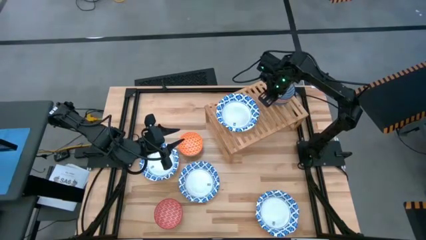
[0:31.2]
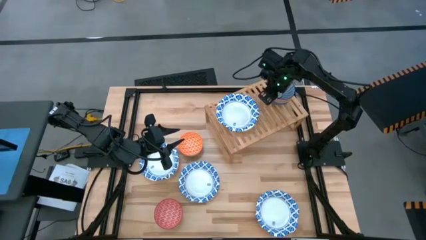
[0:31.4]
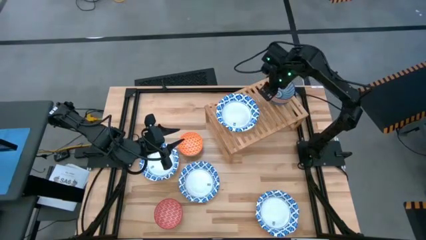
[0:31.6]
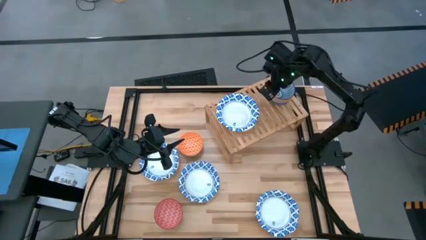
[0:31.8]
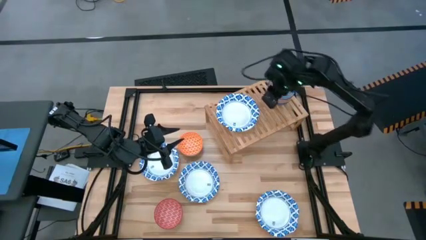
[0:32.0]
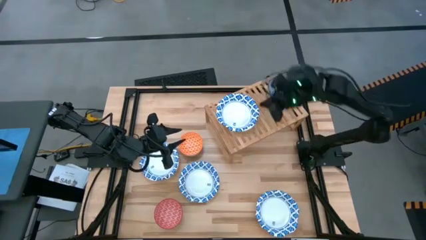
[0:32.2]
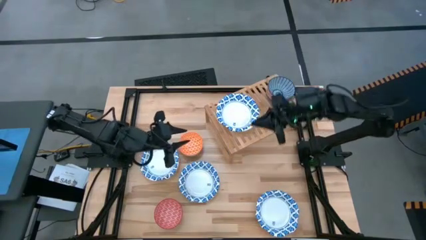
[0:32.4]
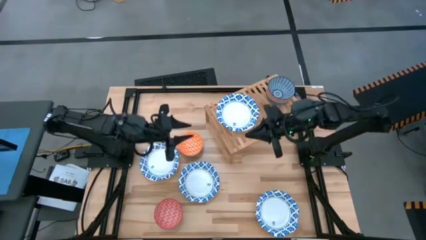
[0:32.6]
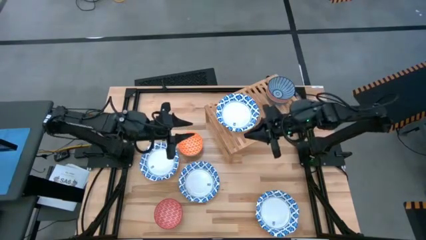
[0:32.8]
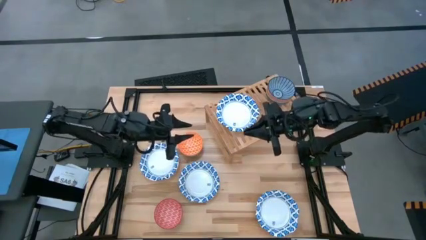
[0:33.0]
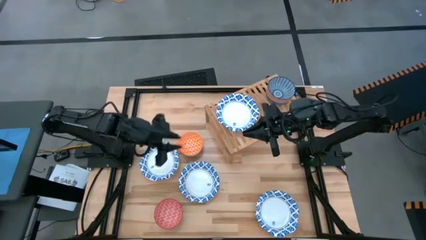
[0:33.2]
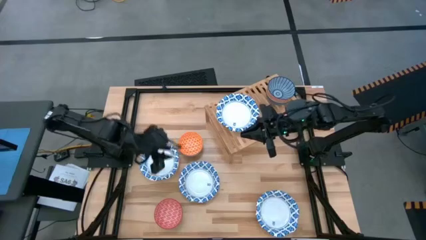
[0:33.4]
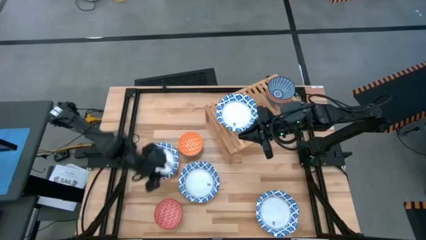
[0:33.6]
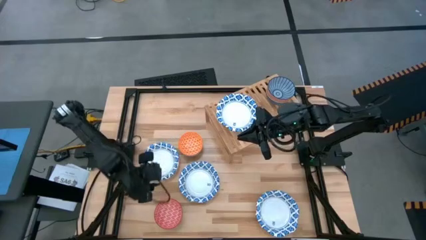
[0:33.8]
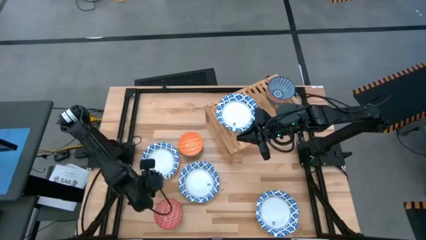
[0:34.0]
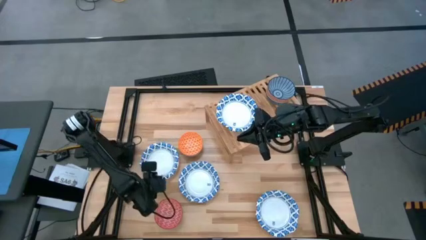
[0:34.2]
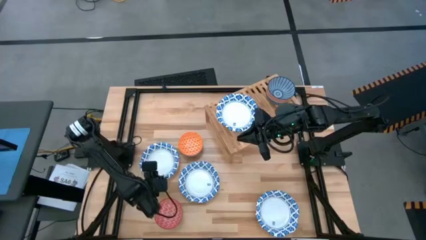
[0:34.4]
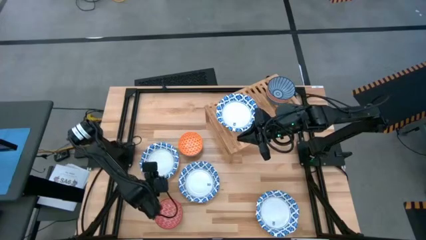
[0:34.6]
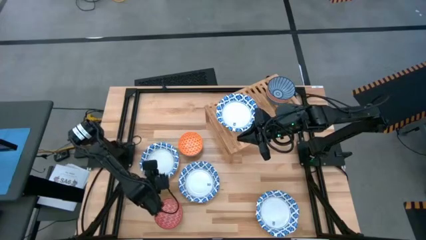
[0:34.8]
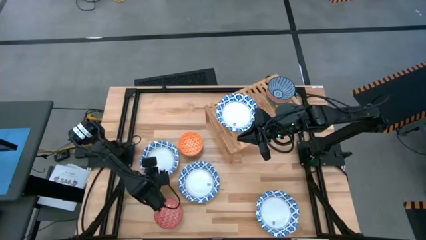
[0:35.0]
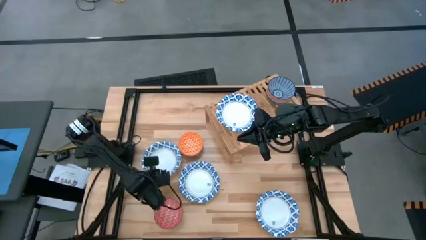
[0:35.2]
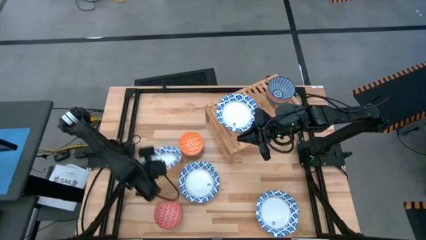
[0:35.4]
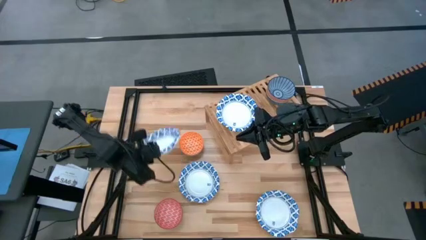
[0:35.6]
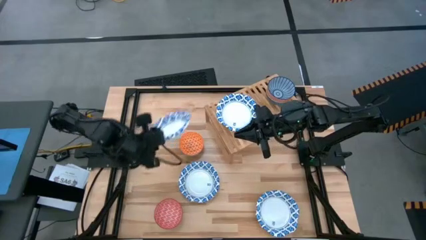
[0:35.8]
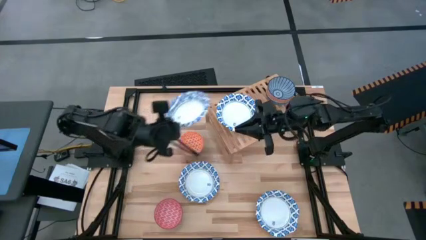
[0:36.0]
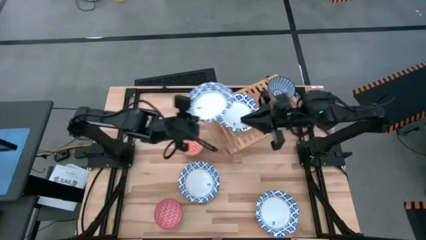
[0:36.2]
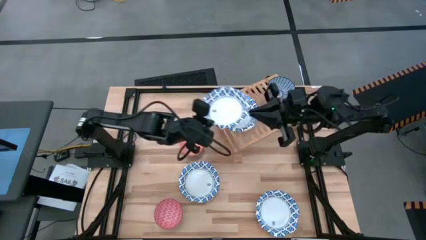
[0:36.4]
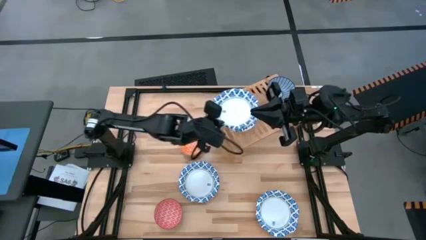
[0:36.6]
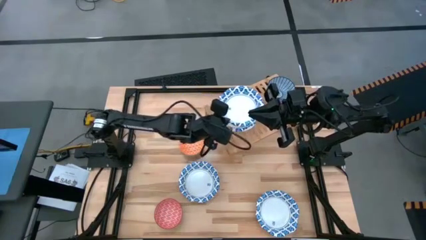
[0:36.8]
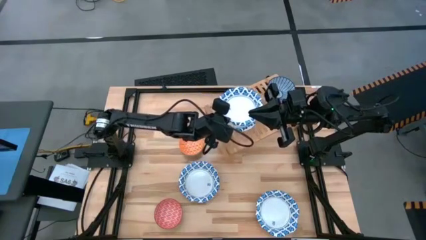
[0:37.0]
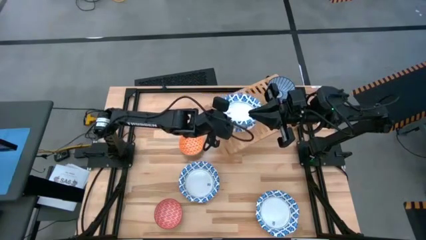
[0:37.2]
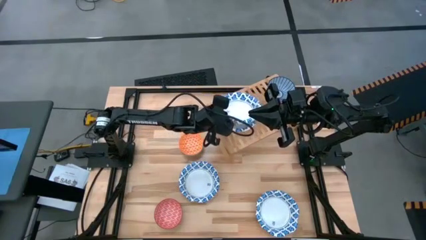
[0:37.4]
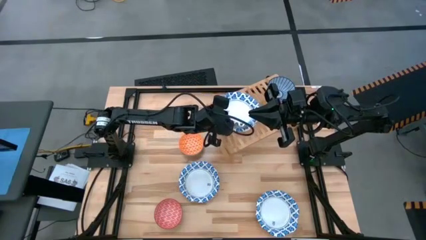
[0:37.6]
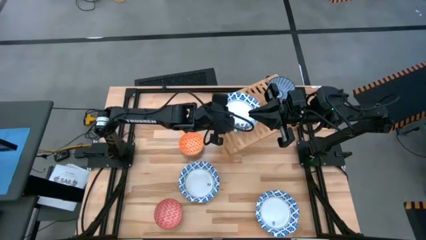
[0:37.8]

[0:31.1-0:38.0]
Task: Place and stack bowls onto a shelf
Stack the left white bowl on top of the white bowl on the shelf

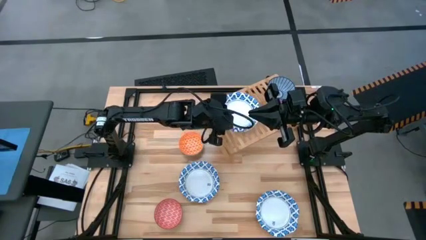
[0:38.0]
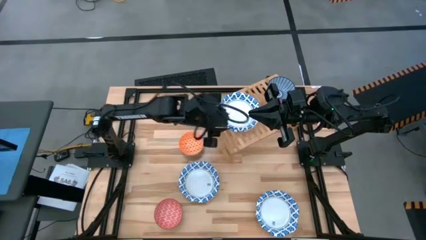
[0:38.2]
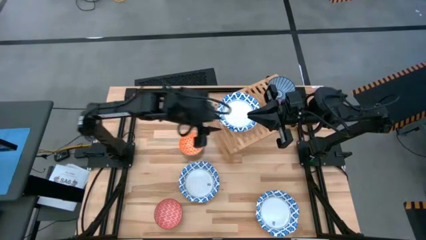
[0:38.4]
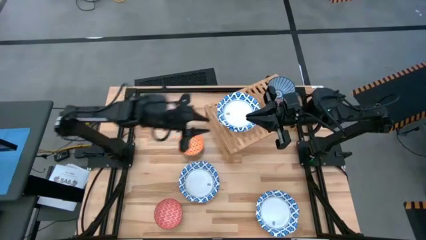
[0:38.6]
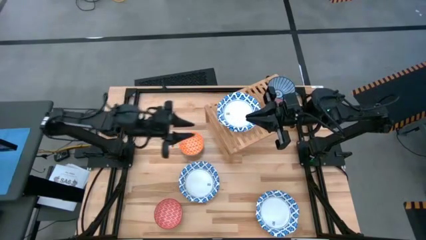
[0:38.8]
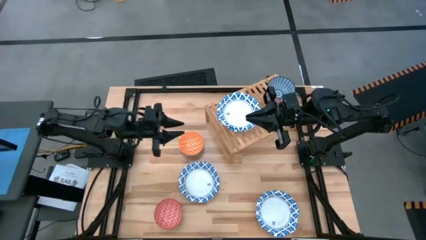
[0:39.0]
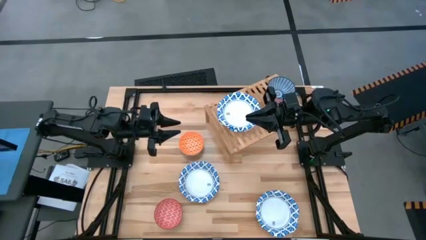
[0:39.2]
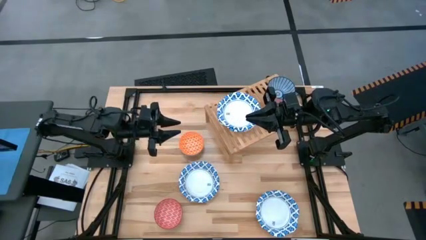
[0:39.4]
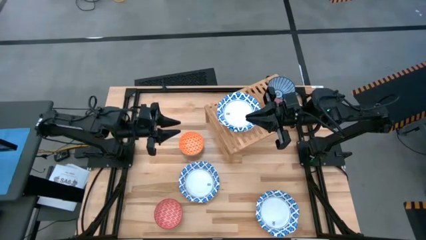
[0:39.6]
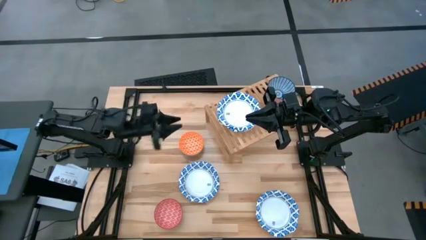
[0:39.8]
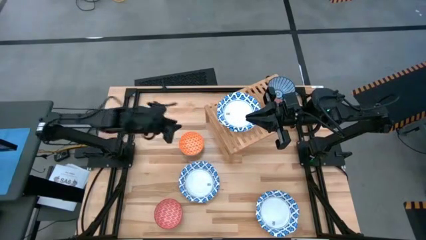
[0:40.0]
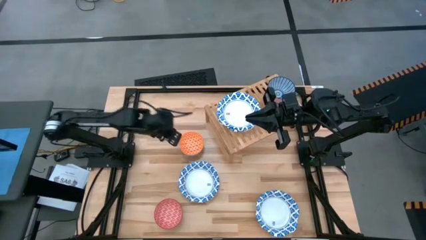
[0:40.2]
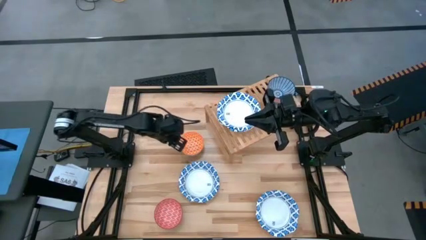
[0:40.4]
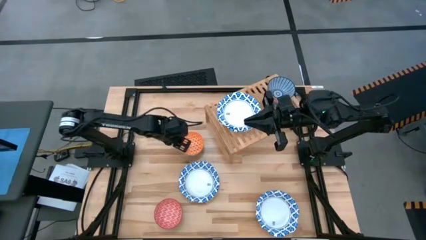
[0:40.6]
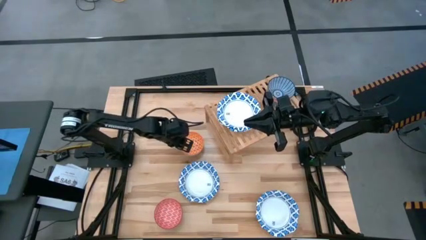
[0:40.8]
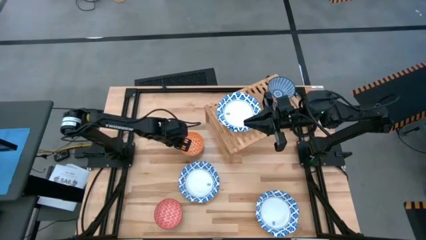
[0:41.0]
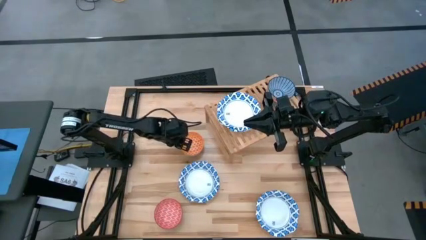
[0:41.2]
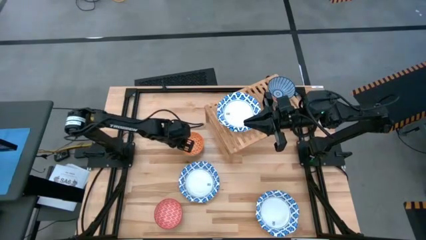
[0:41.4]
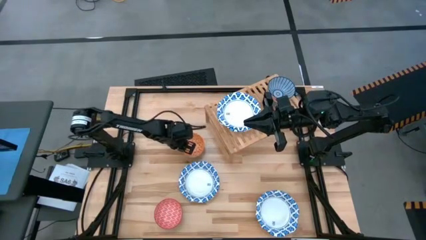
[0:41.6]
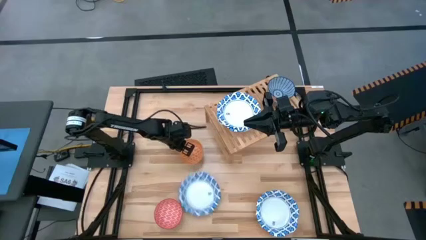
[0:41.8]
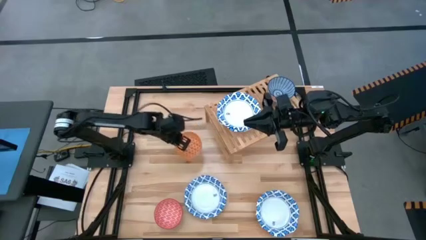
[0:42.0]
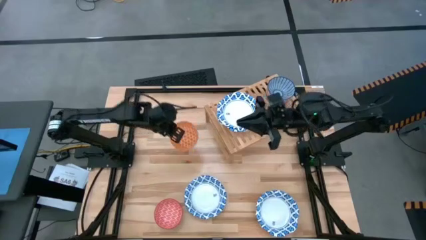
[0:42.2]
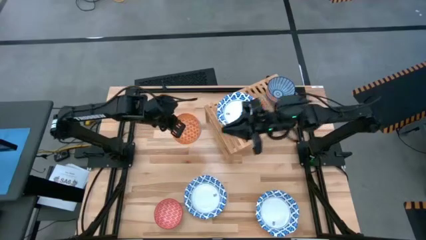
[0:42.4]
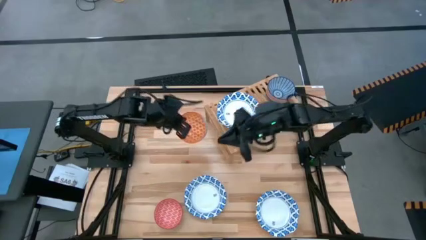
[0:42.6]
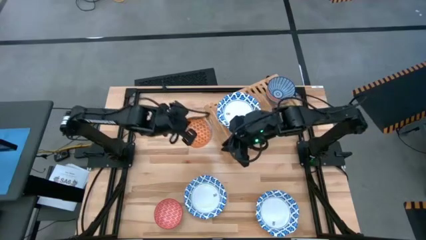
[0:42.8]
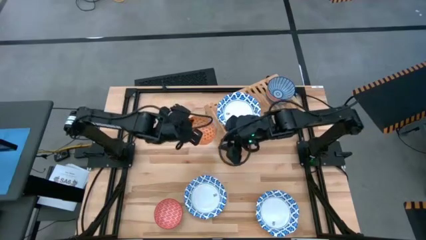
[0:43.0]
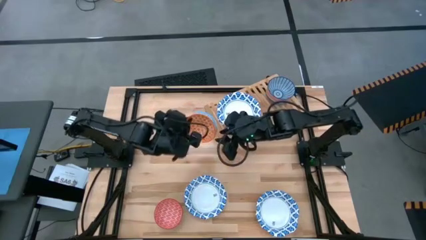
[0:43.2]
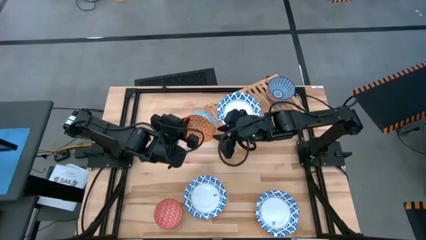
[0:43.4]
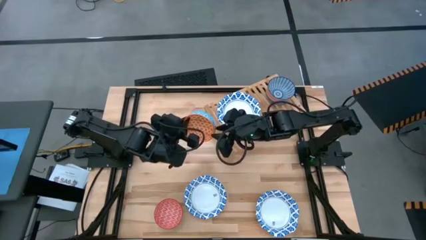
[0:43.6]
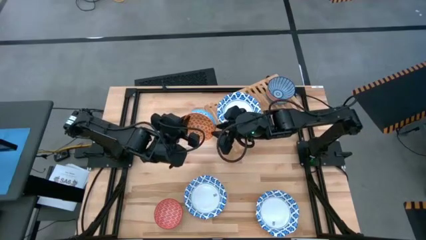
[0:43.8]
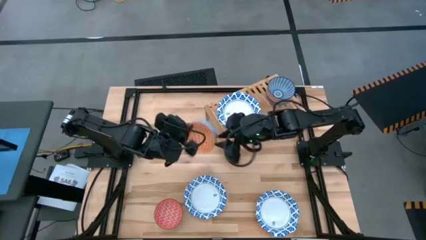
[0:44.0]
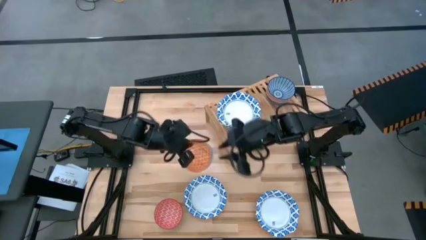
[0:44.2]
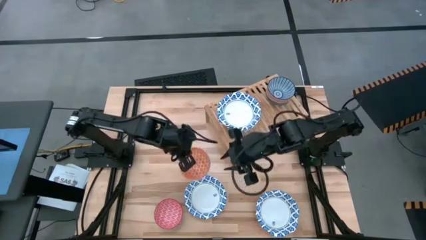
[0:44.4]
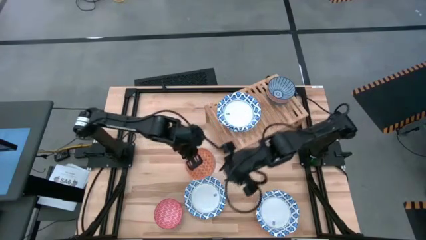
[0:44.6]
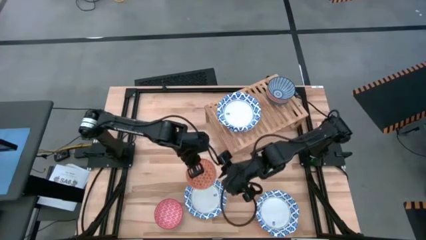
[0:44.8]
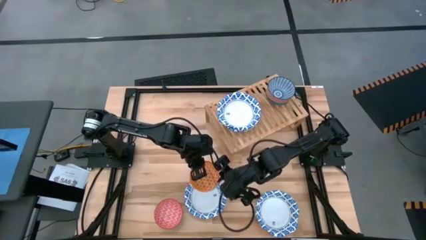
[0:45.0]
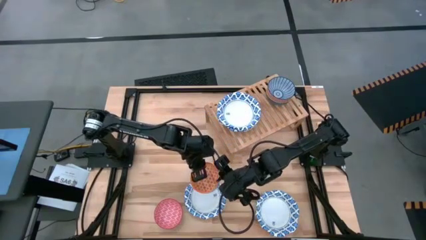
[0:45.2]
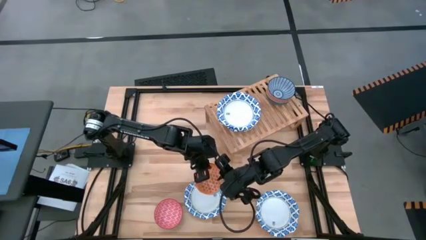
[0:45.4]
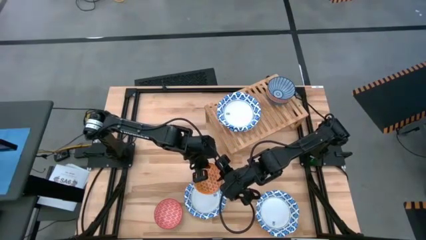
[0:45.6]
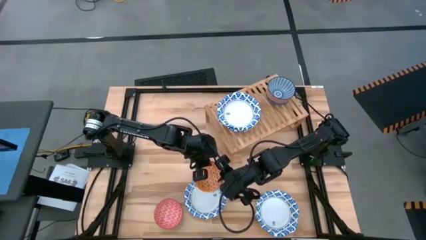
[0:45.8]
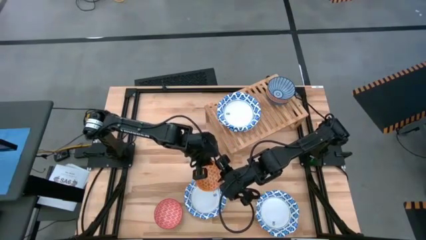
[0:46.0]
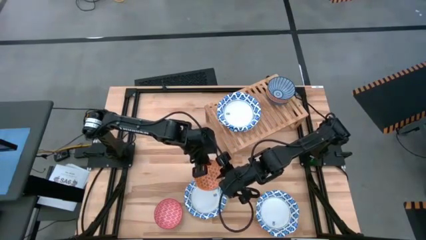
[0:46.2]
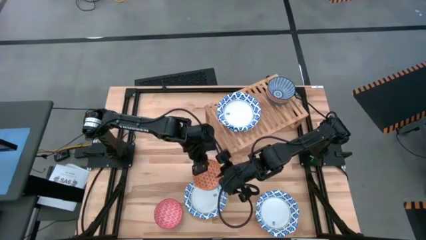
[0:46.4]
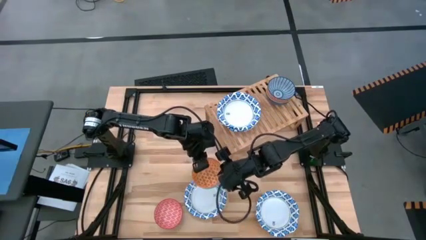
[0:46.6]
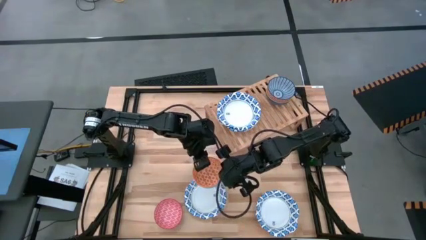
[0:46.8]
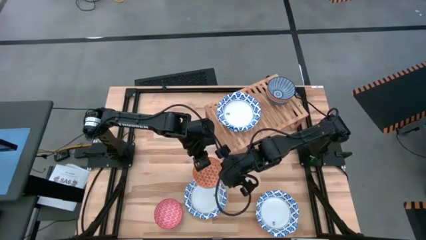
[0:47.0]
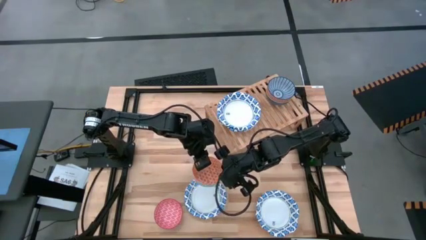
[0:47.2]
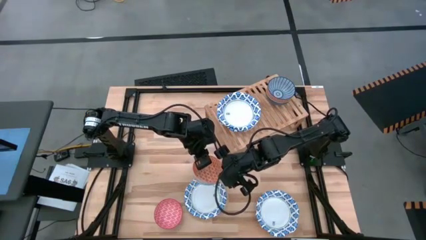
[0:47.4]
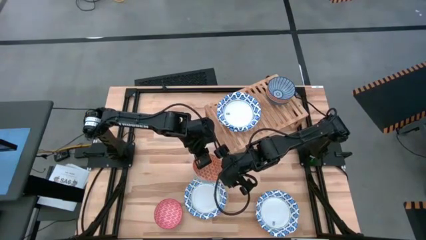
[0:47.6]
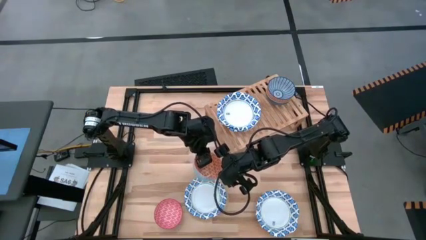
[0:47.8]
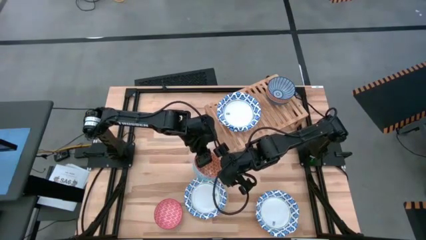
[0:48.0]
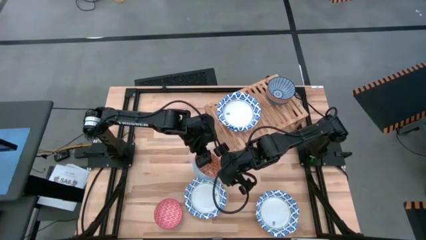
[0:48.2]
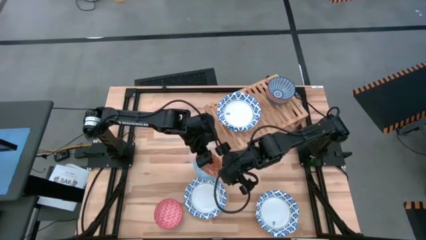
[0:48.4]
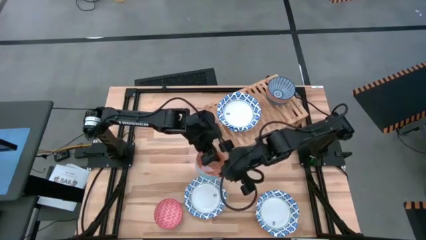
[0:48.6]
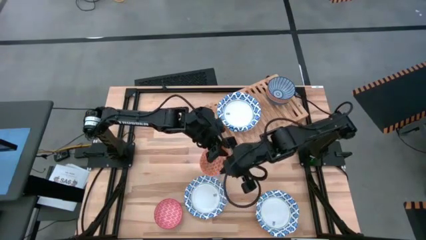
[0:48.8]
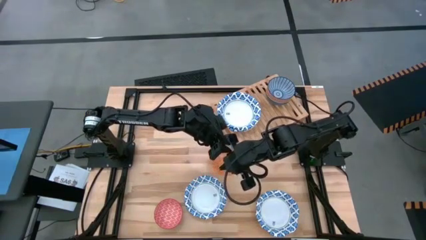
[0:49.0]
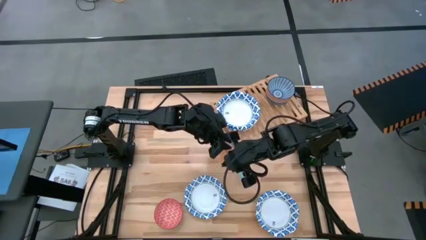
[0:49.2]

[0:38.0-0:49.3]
Stack the orange pattern bowl on top of the blue pattern bowl on the shelf
